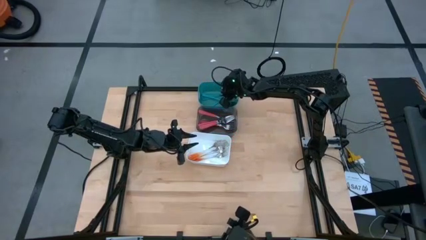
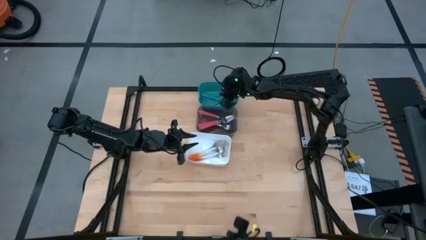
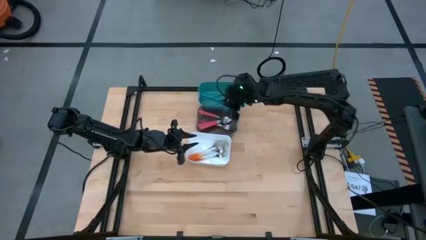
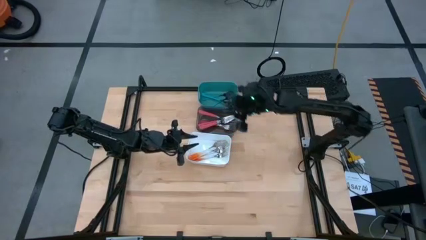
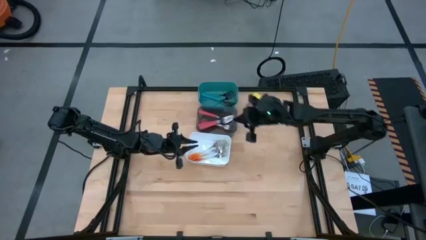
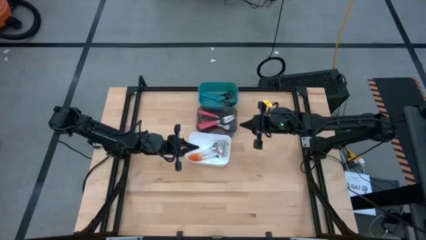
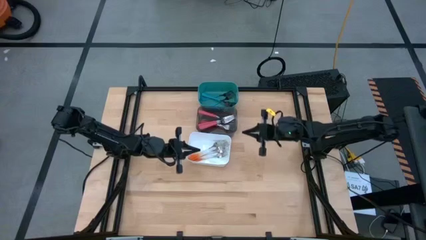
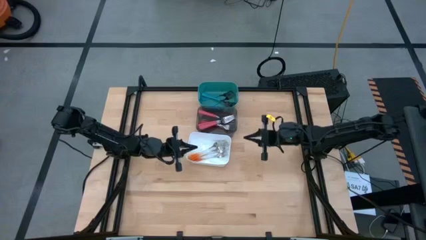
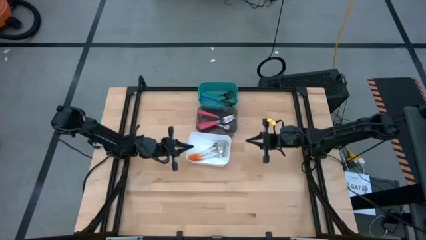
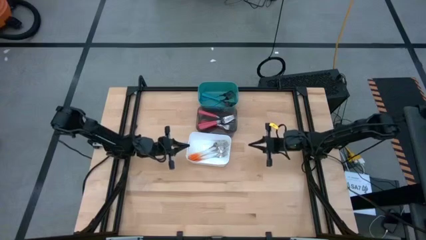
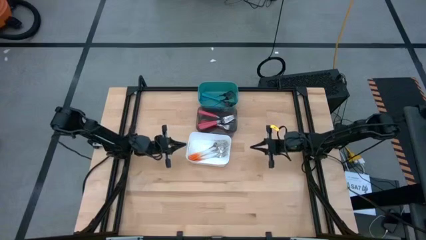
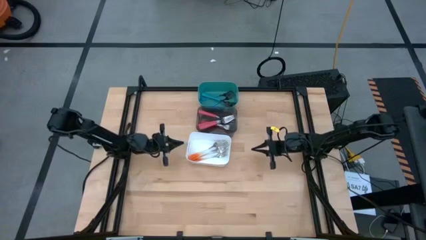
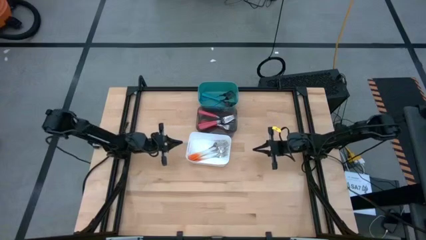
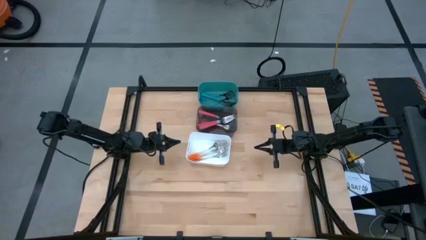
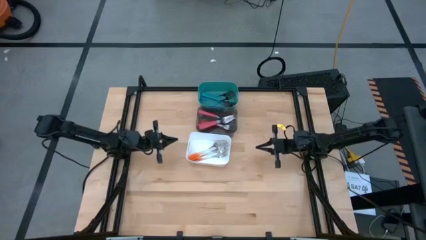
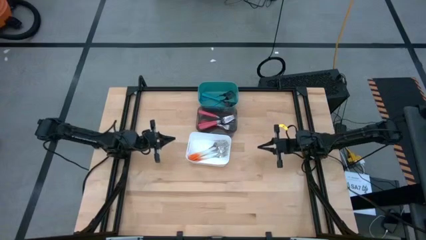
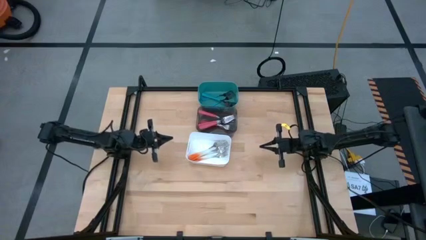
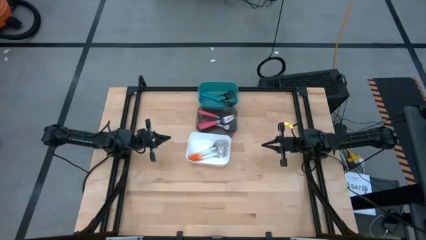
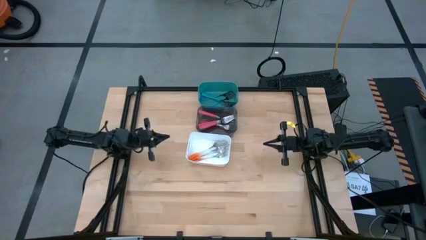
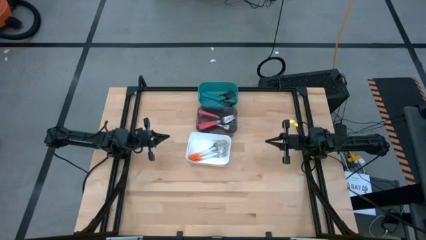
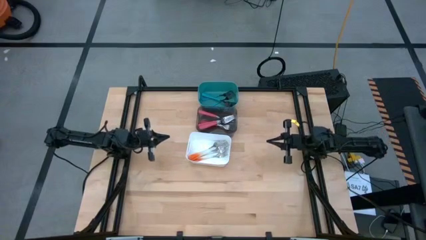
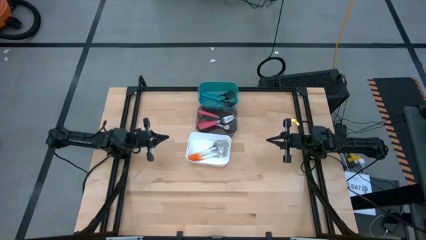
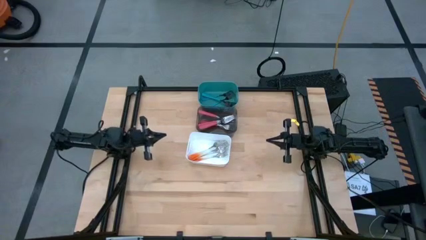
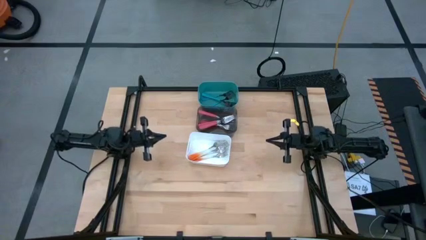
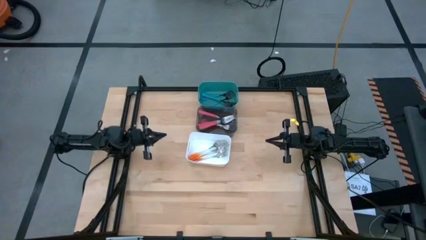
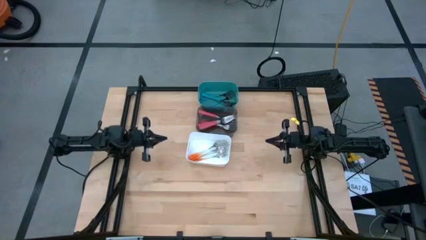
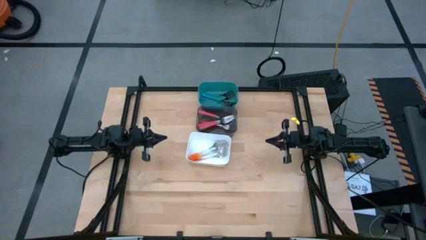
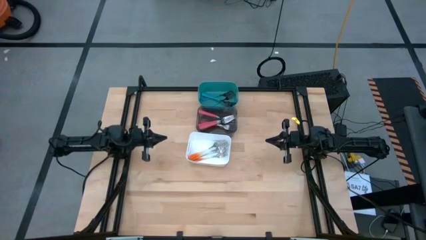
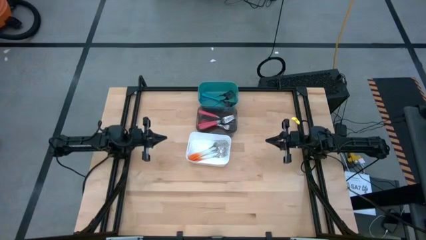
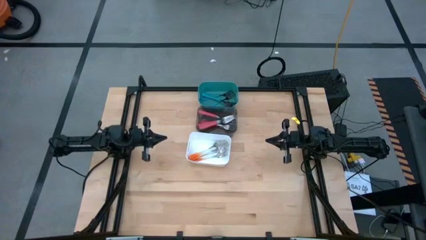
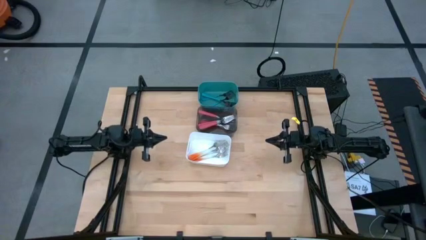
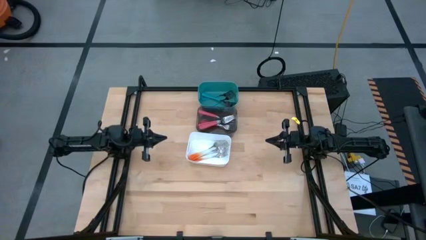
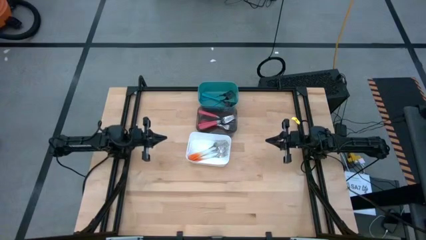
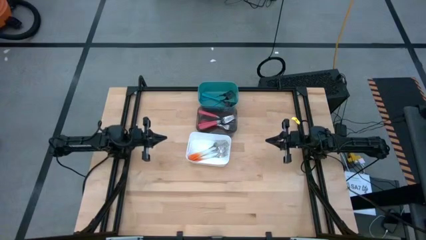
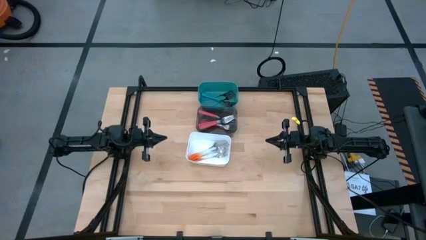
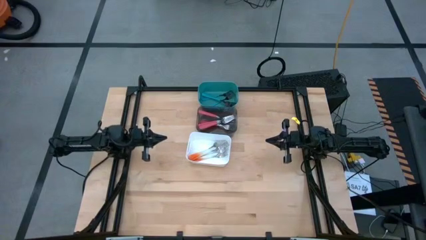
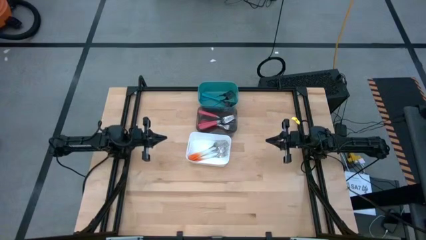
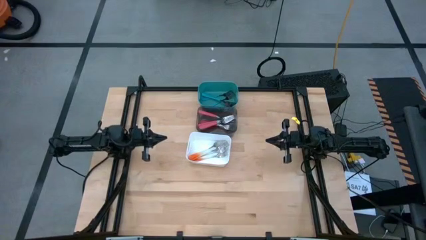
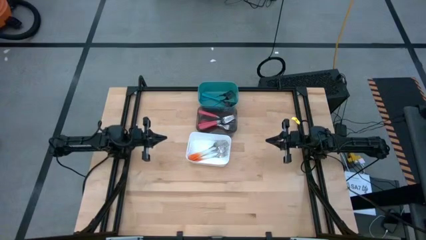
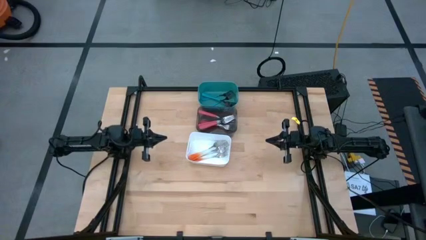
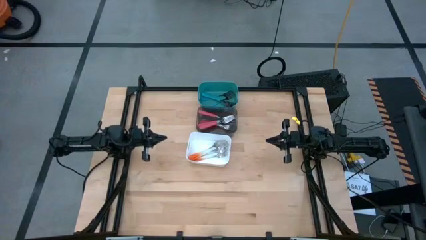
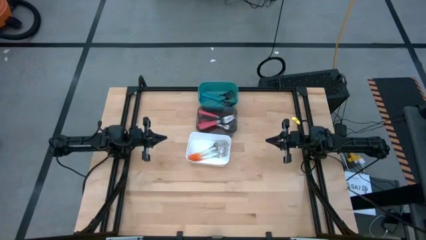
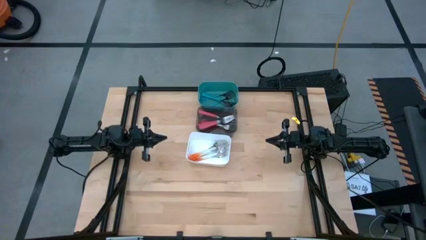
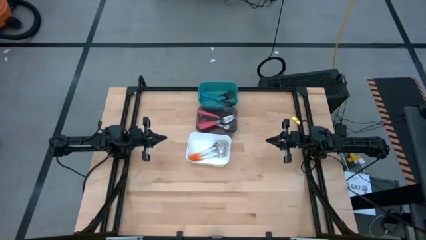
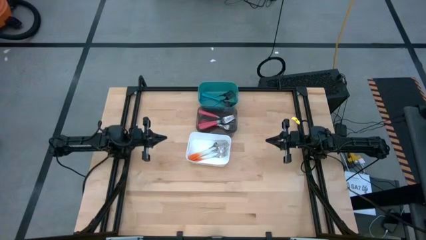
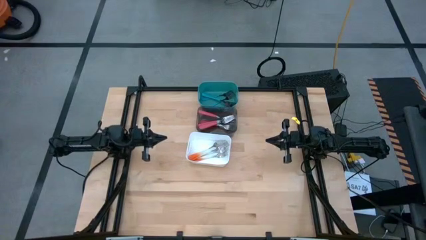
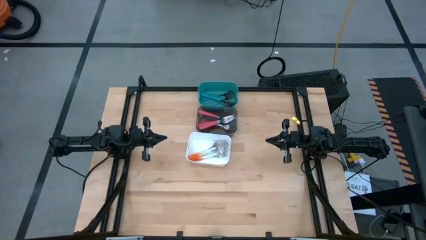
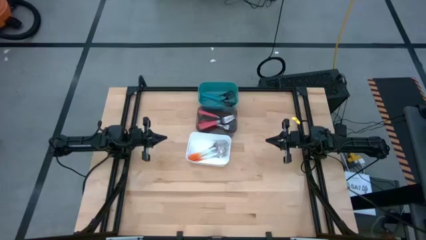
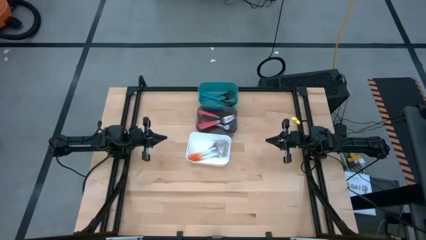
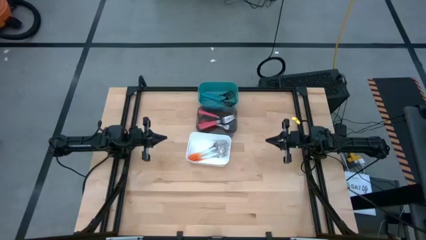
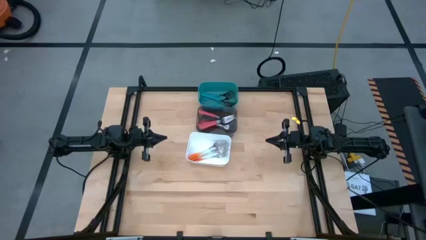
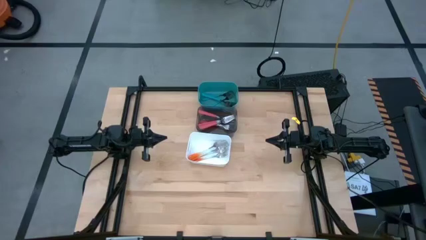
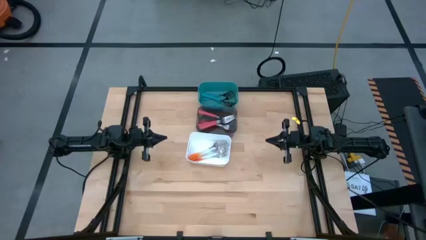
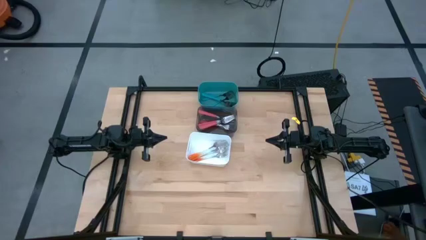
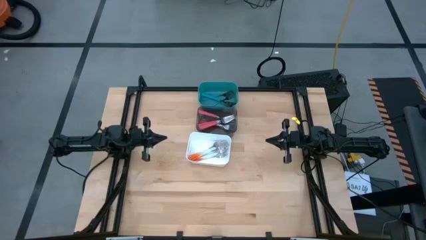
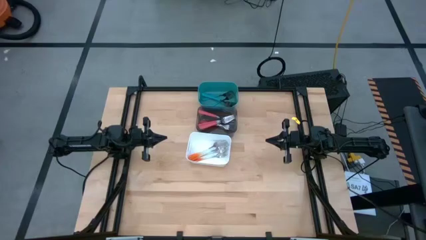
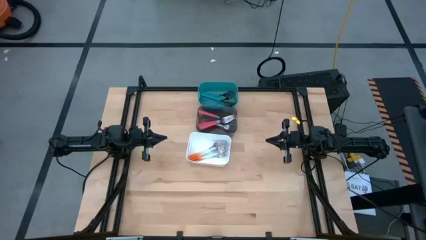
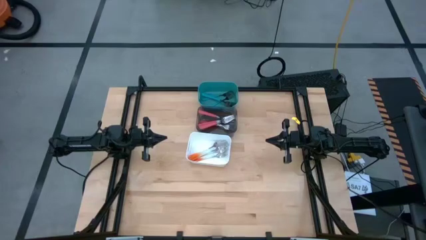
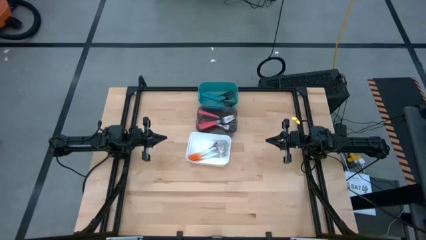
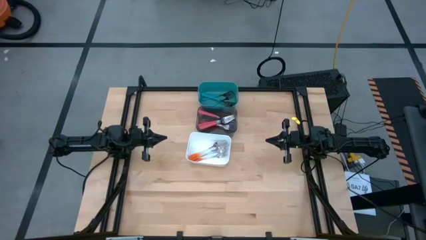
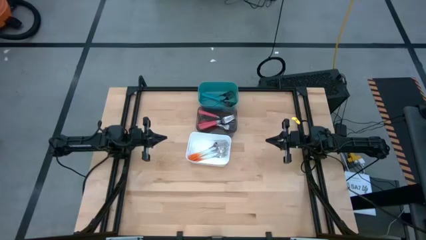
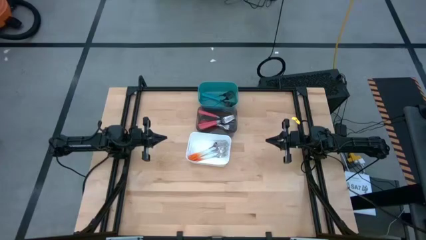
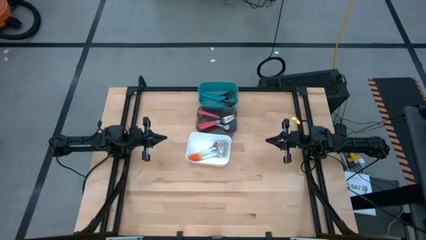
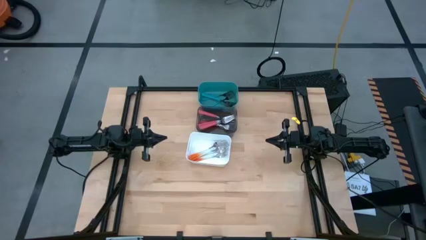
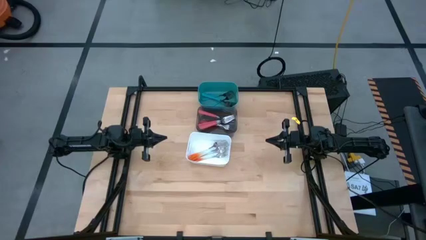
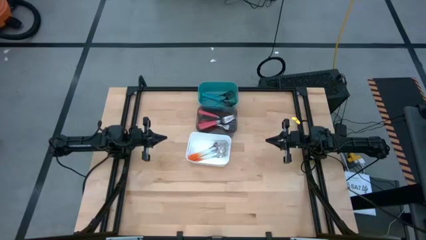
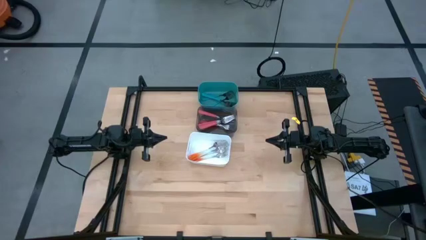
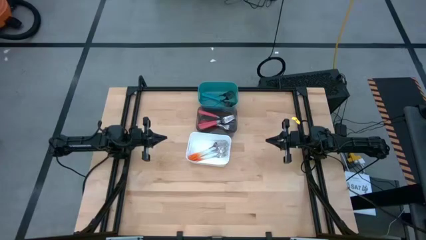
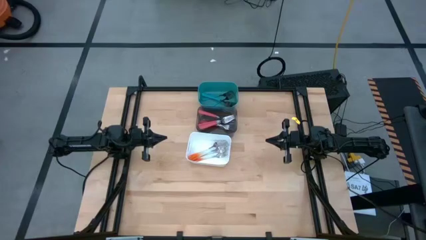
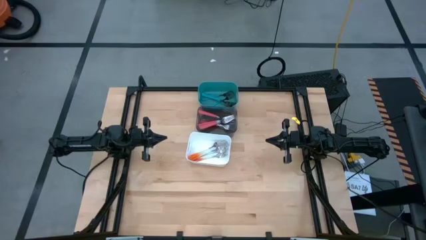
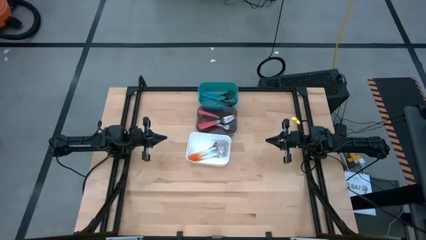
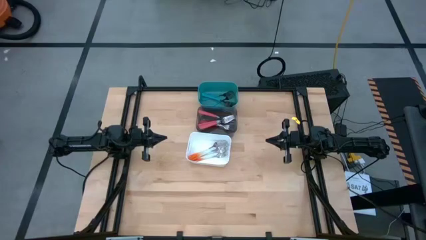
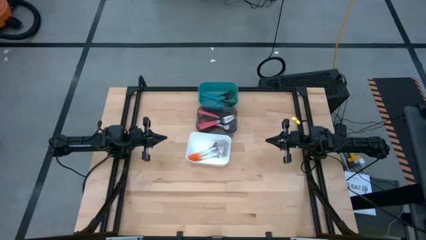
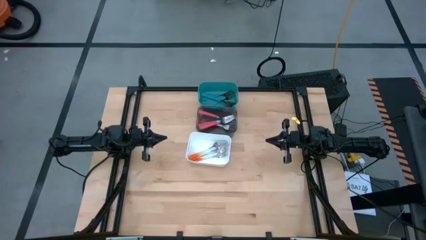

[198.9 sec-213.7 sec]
Task: Sort silverware by color (type)
Return to Home Position
